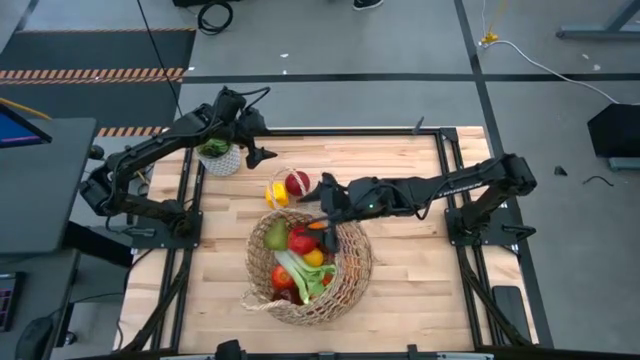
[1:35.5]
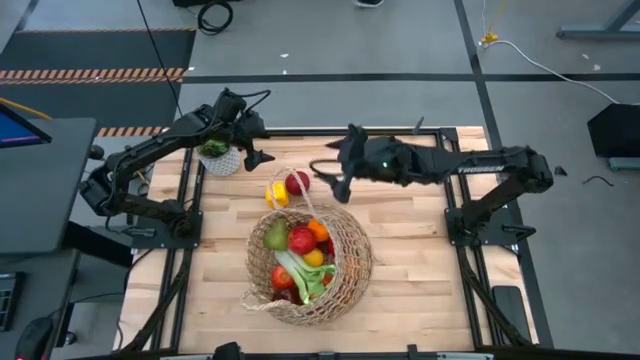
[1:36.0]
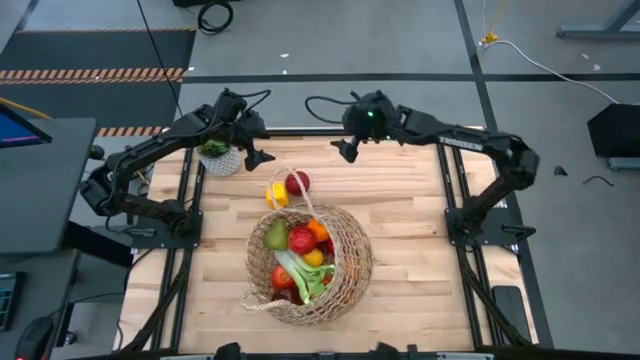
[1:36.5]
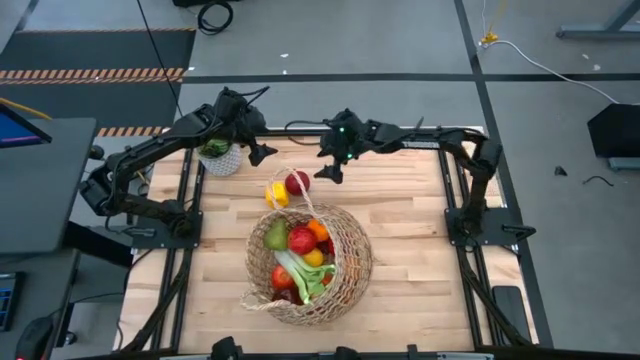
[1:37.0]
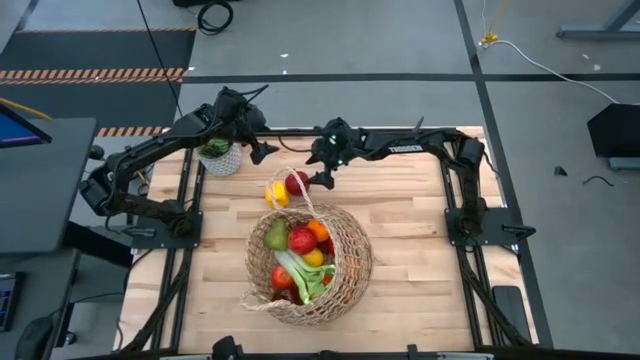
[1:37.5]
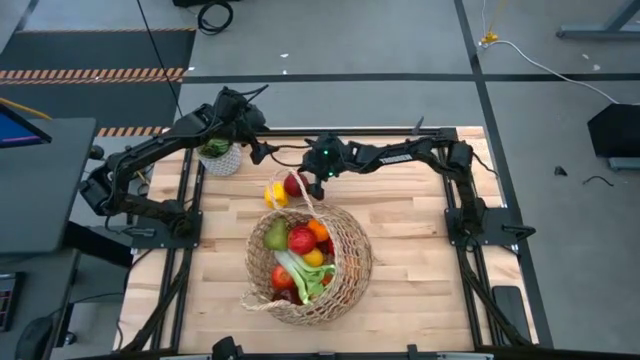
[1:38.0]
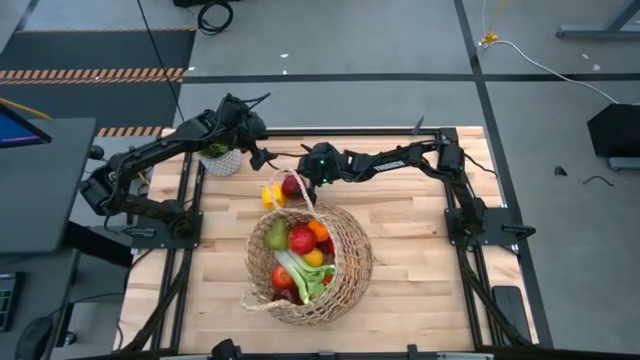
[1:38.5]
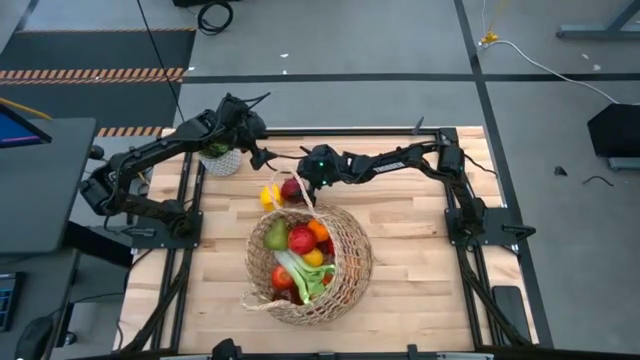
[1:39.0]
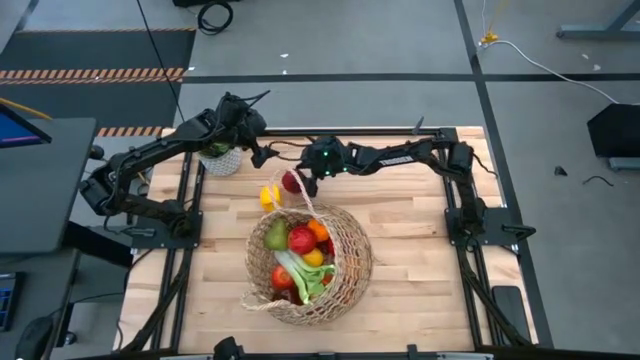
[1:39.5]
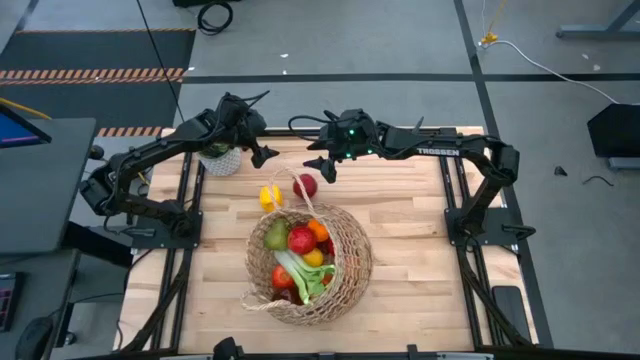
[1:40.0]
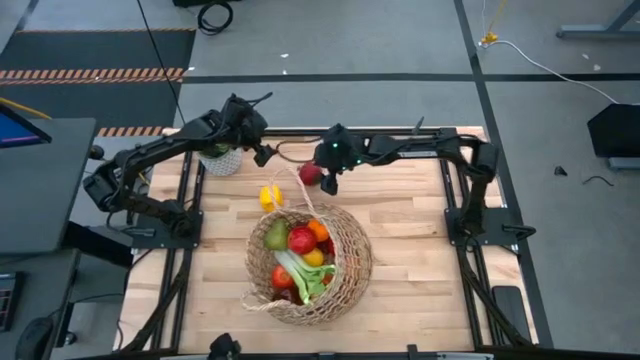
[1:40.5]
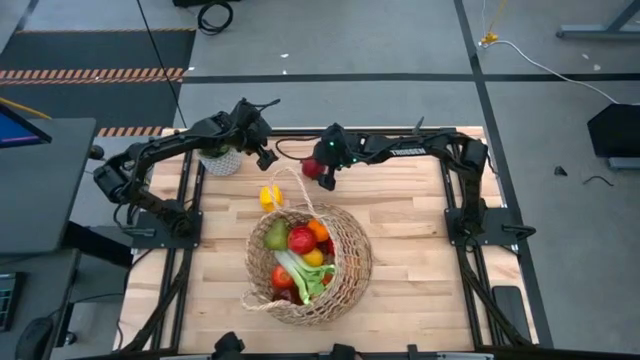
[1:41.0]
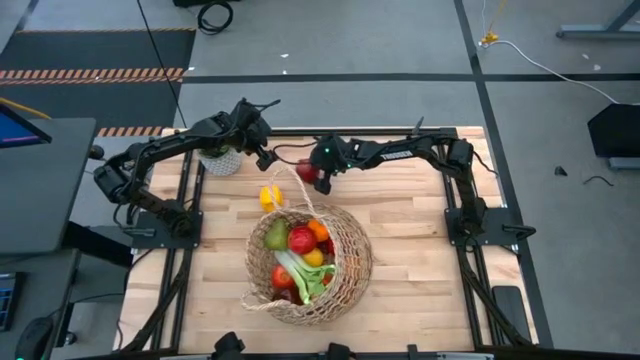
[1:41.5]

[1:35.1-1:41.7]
Task: Build produce basket
Put the pomegranate into the basket

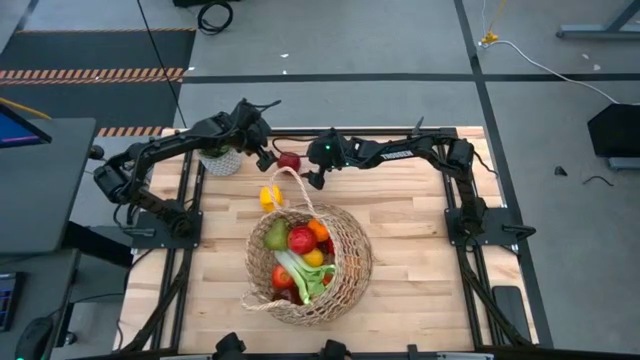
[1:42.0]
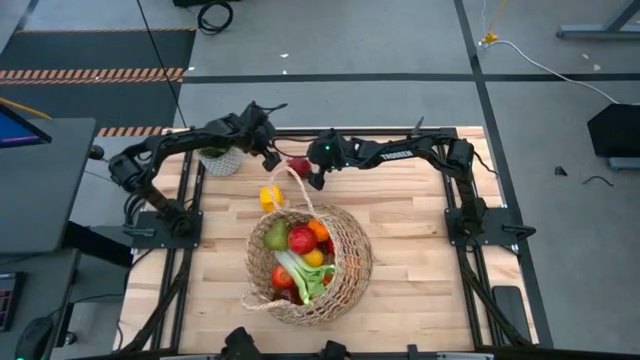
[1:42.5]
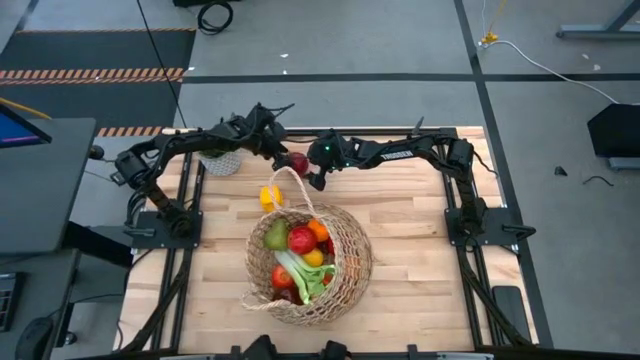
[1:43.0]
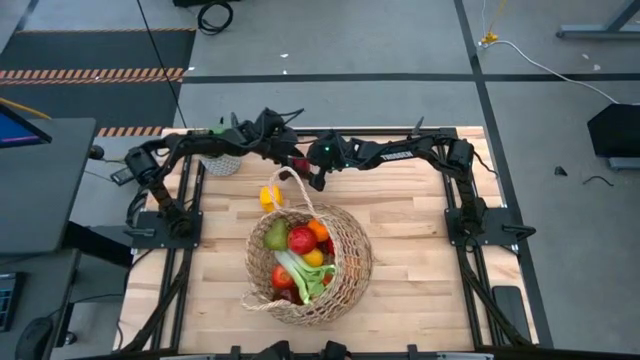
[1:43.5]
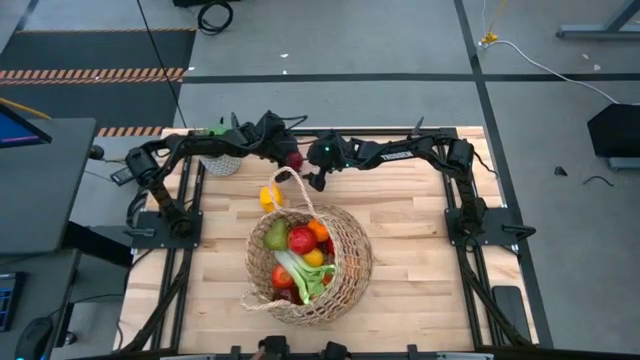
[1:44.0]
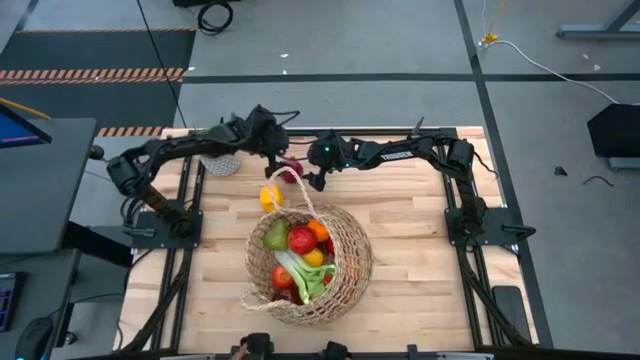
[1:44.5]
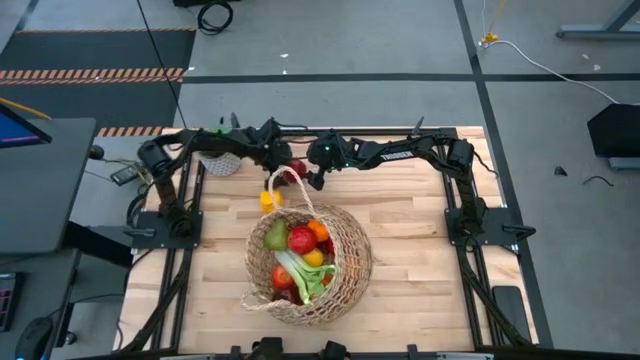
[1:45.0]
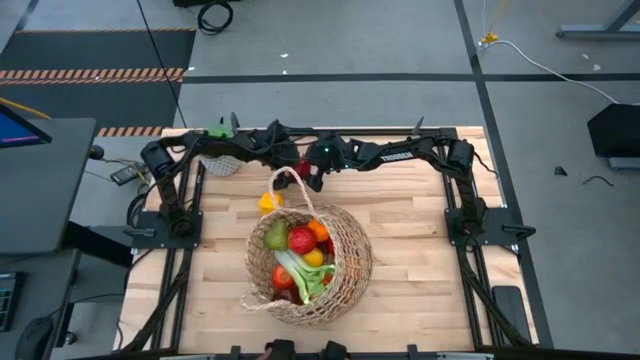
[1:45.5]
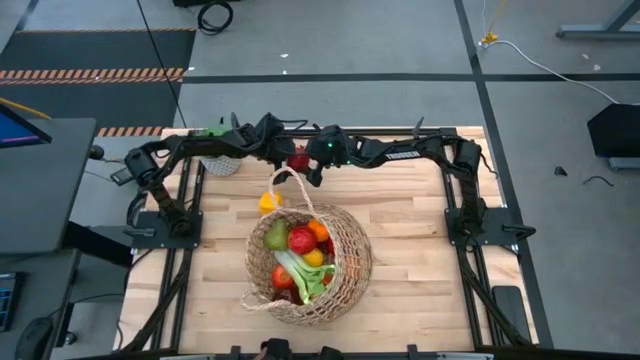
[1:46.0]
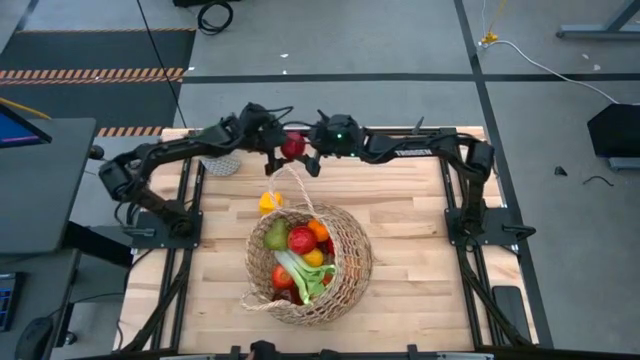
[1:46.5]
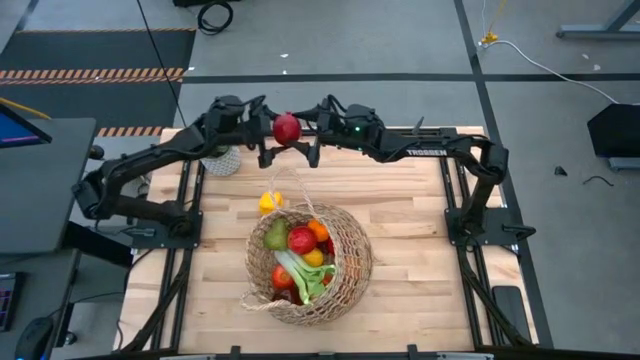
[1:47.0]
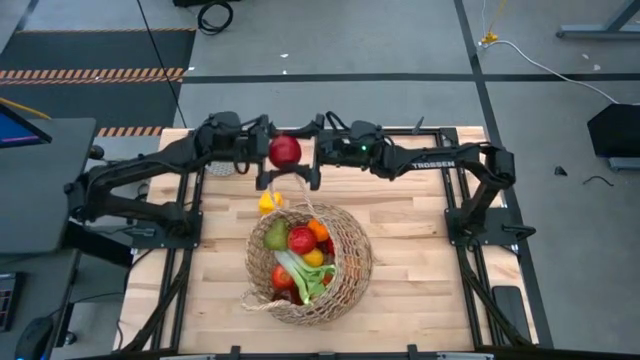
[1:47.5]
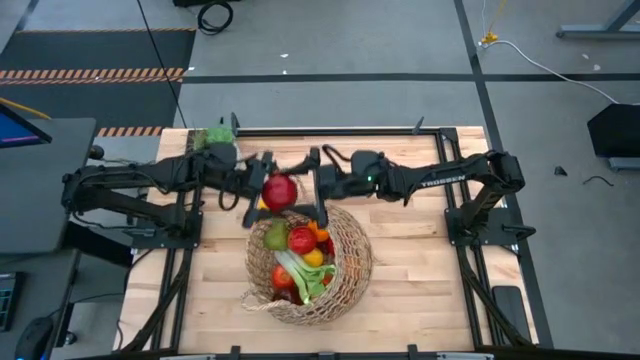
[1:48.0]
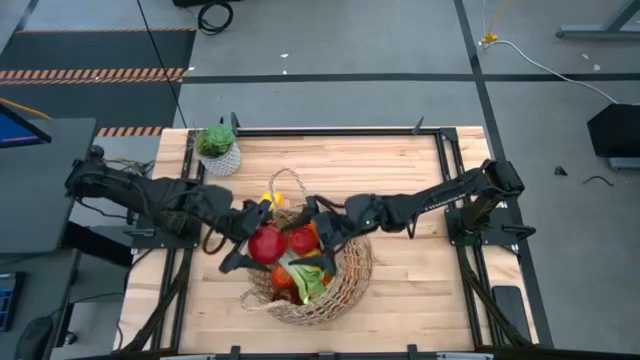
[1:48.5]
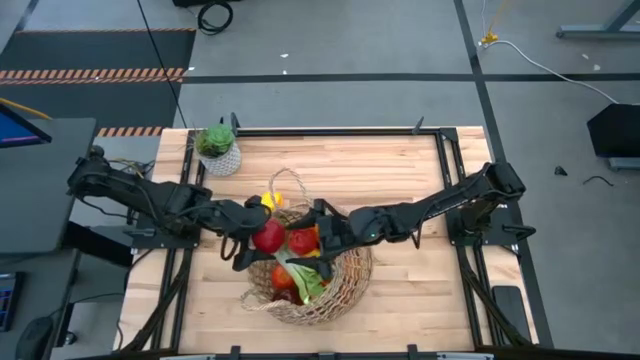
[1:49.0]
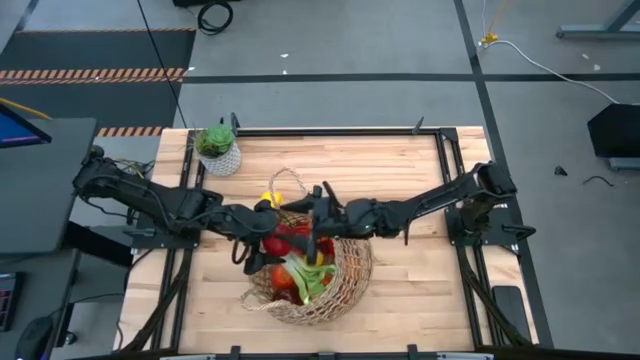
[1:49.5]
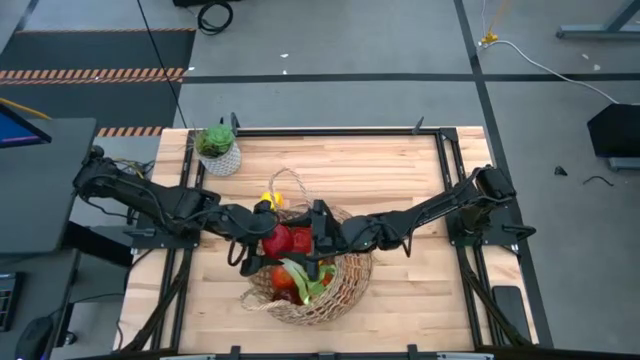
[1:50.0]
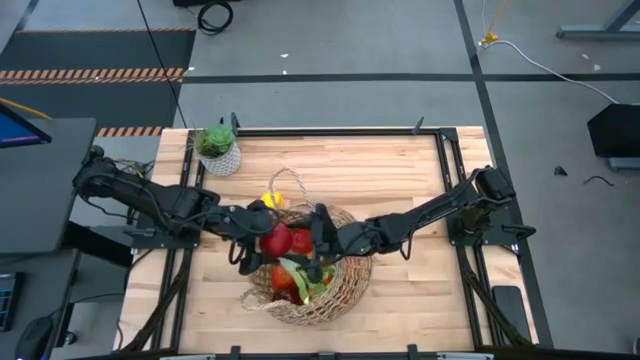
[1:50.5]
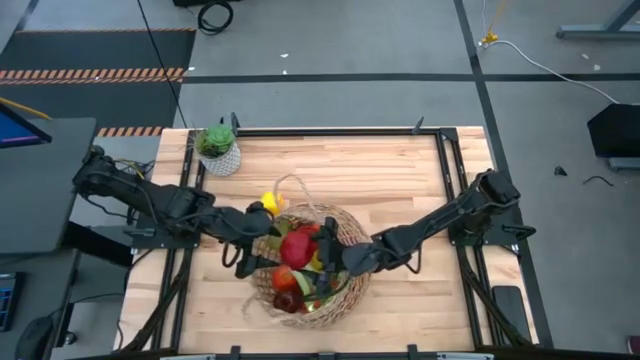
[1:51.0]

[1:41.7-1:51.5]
Put the pomegranate into the basket
